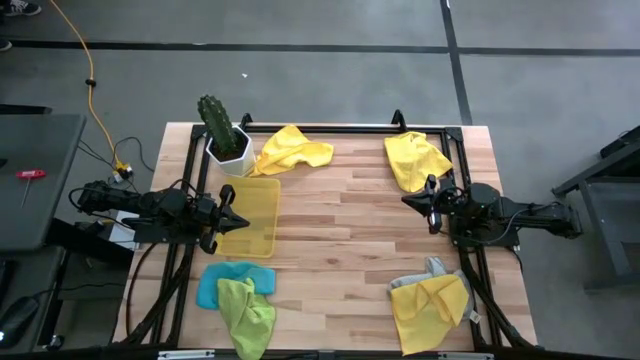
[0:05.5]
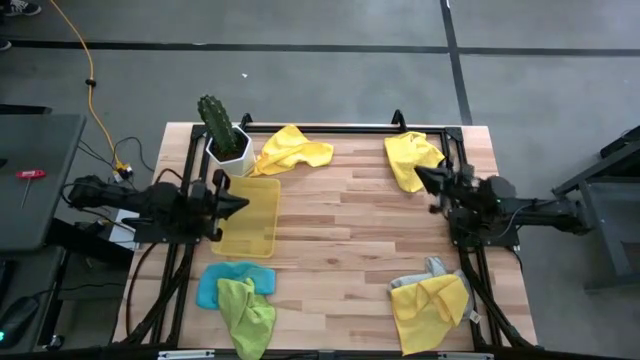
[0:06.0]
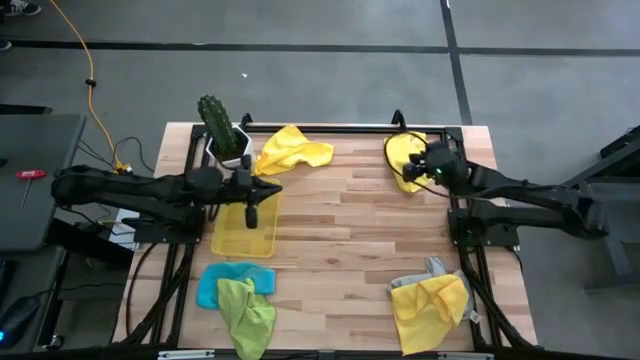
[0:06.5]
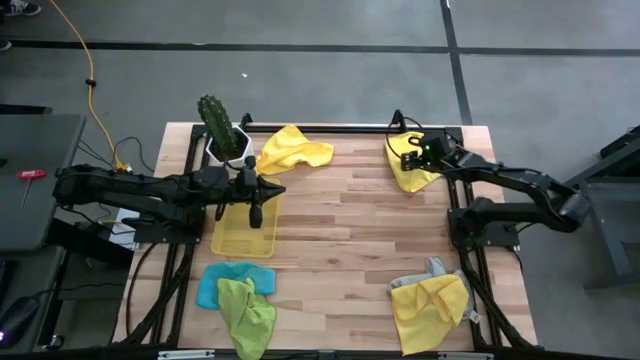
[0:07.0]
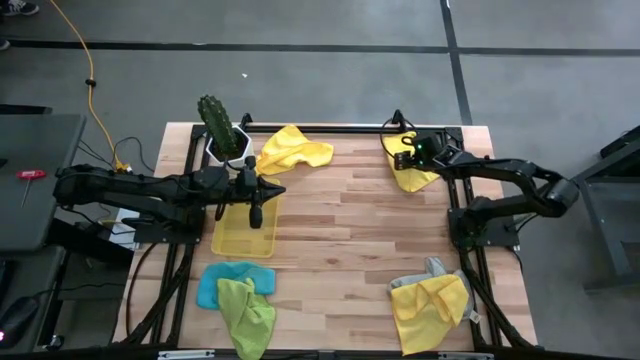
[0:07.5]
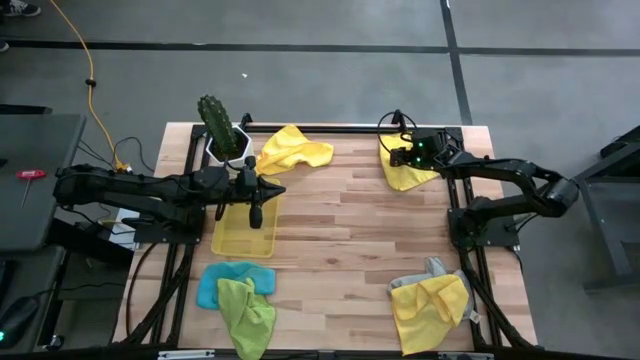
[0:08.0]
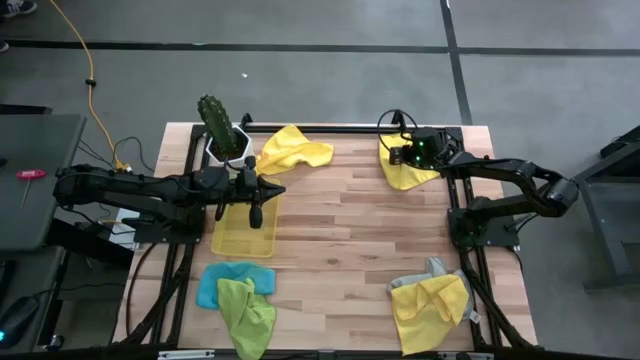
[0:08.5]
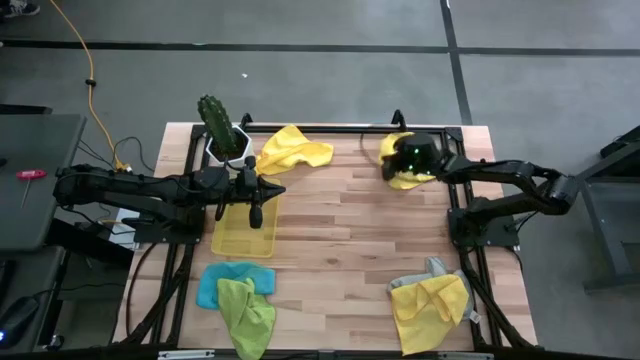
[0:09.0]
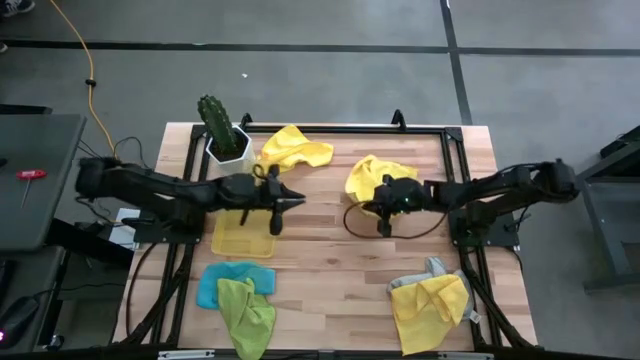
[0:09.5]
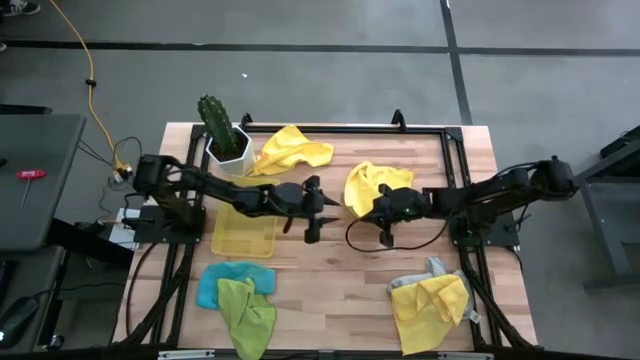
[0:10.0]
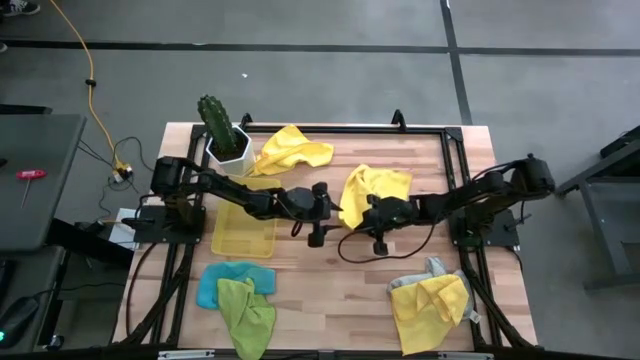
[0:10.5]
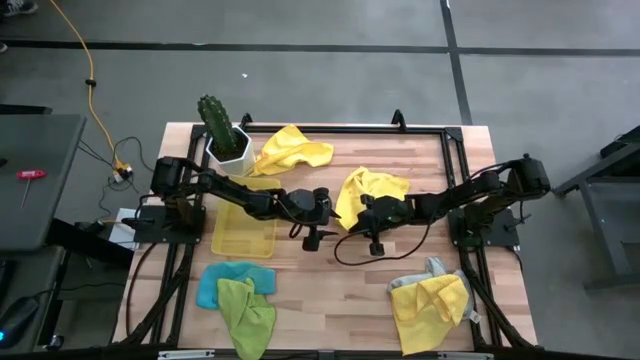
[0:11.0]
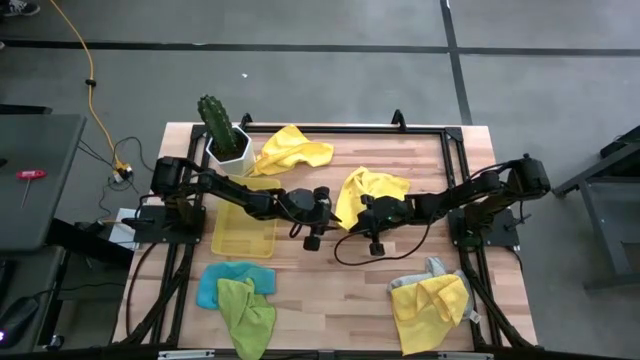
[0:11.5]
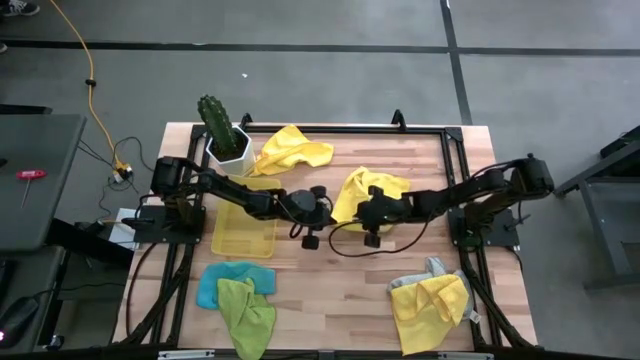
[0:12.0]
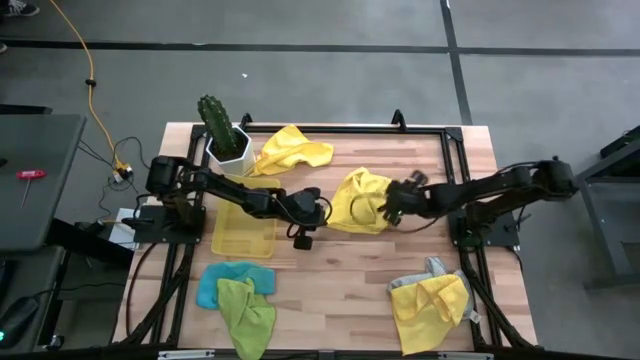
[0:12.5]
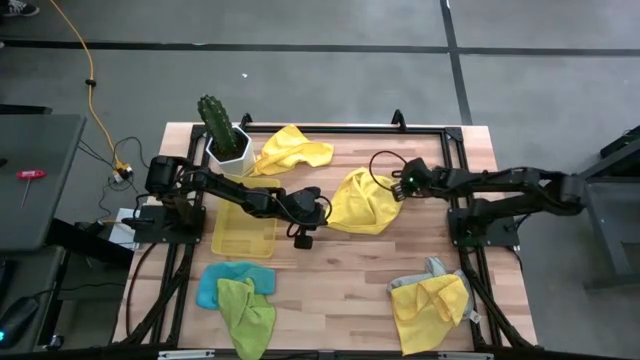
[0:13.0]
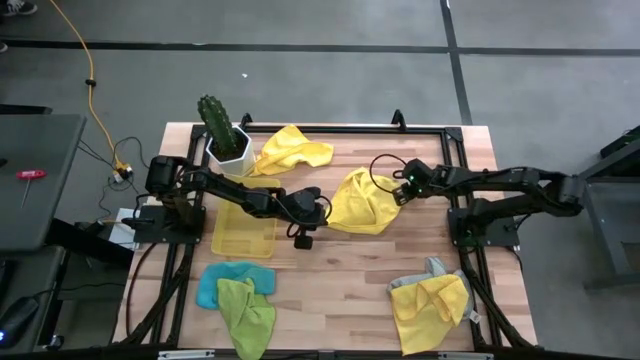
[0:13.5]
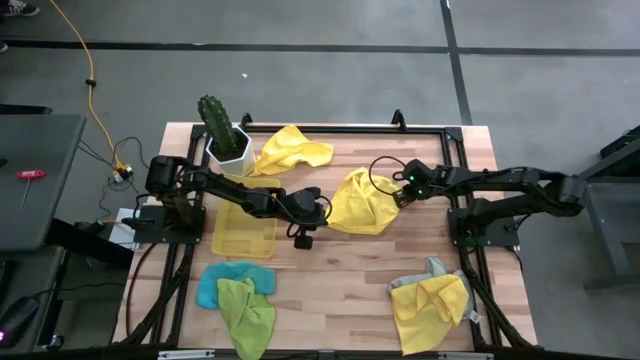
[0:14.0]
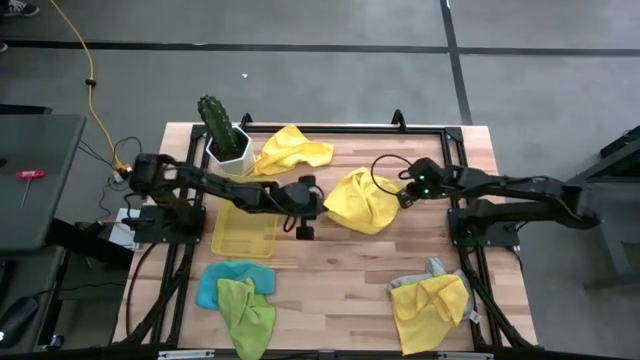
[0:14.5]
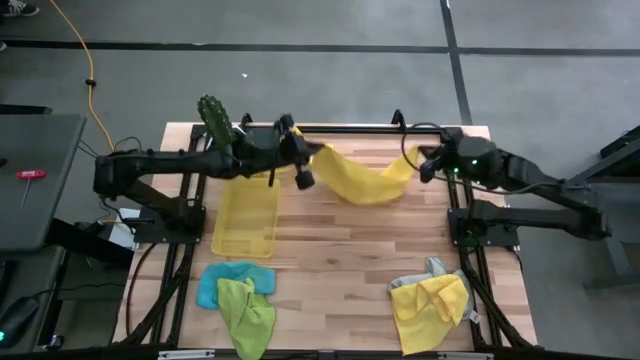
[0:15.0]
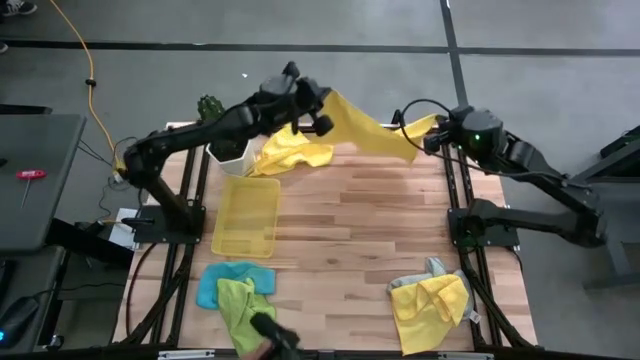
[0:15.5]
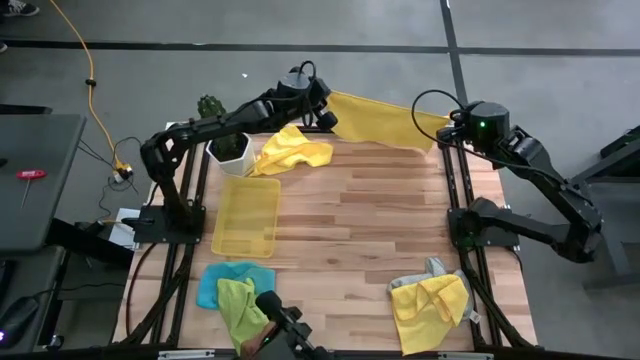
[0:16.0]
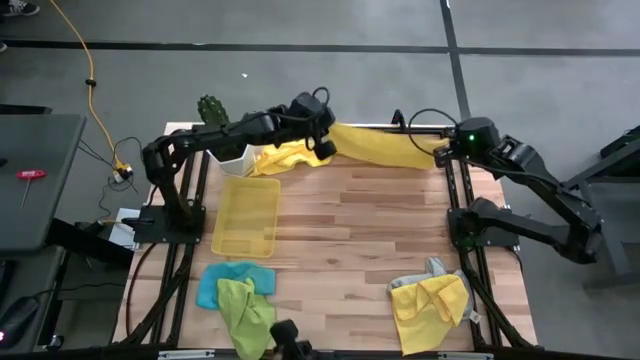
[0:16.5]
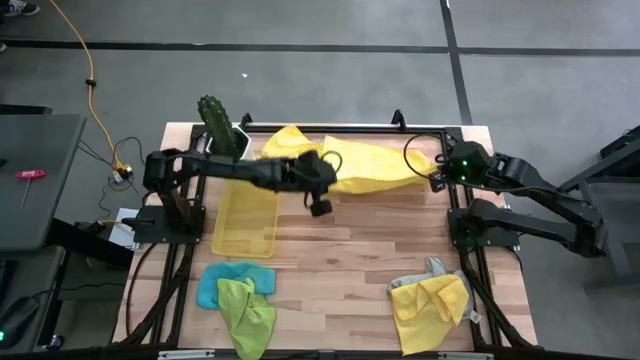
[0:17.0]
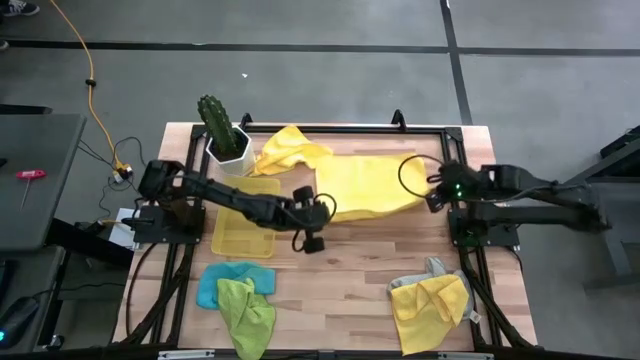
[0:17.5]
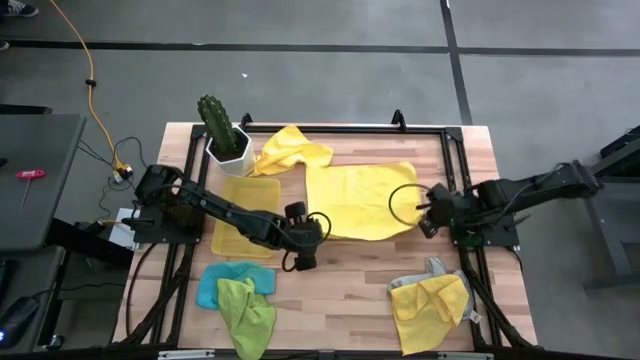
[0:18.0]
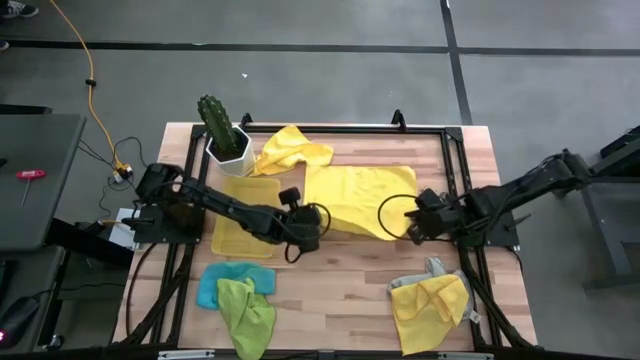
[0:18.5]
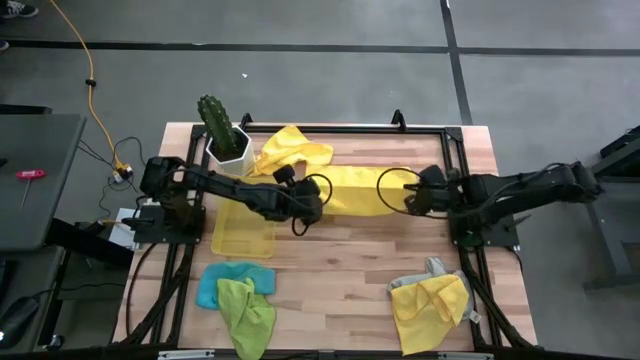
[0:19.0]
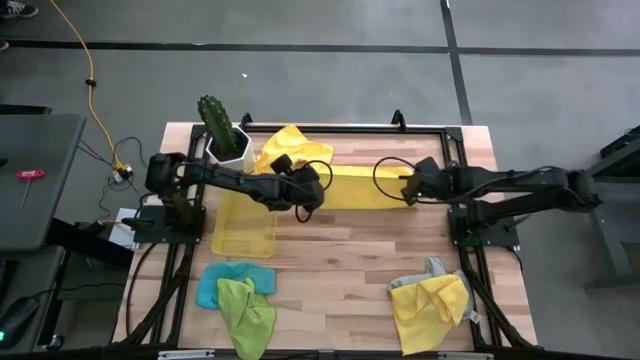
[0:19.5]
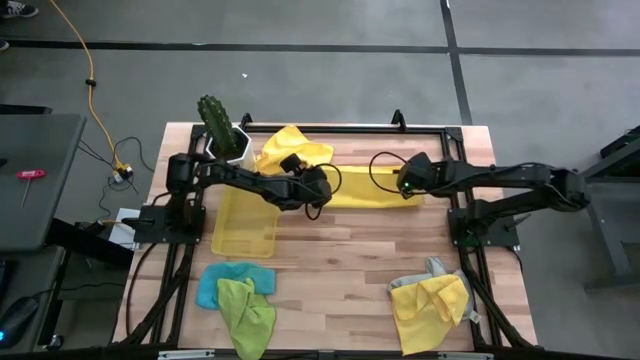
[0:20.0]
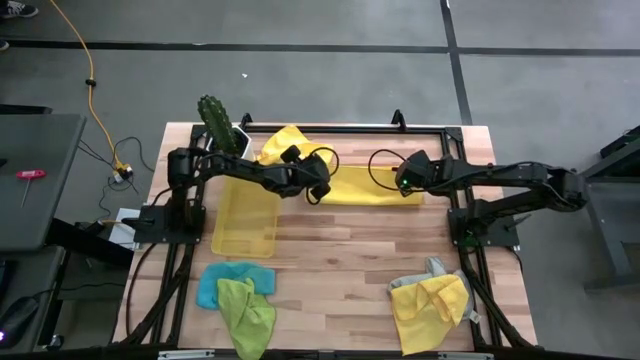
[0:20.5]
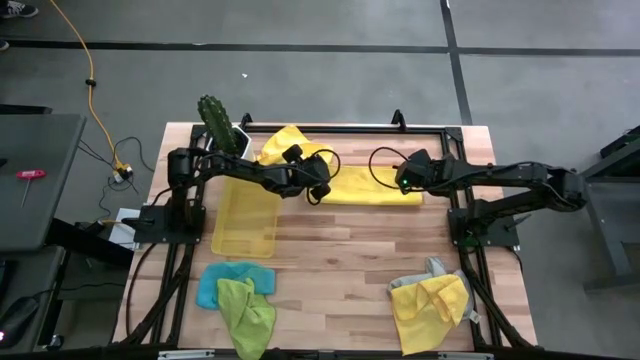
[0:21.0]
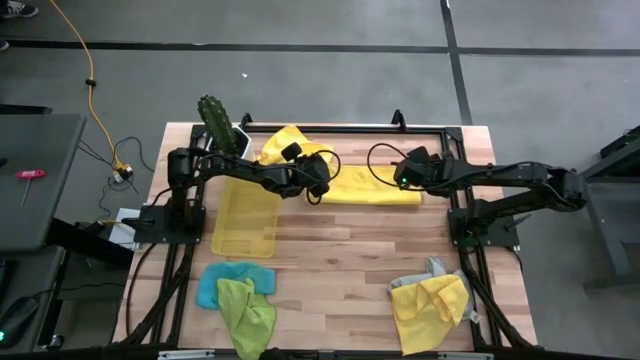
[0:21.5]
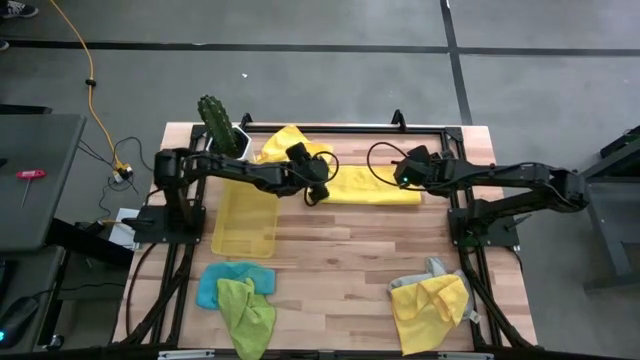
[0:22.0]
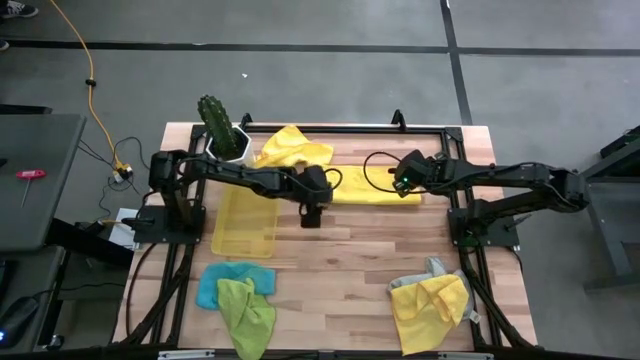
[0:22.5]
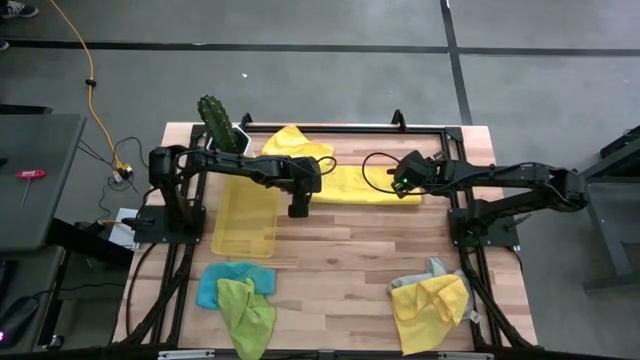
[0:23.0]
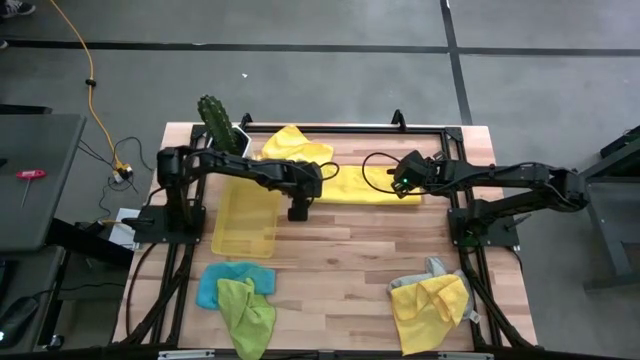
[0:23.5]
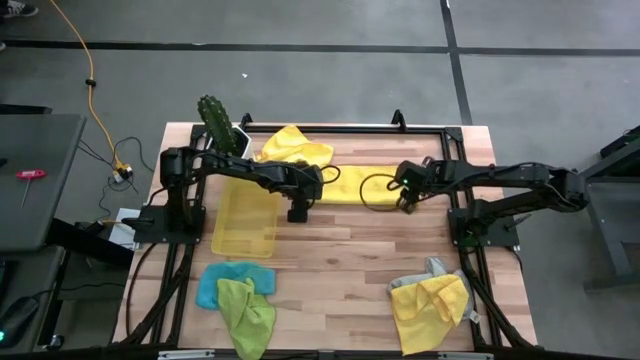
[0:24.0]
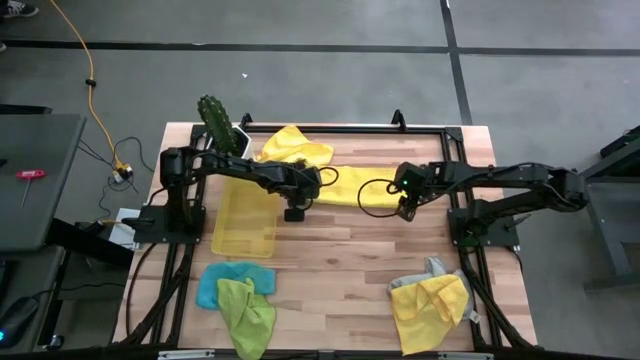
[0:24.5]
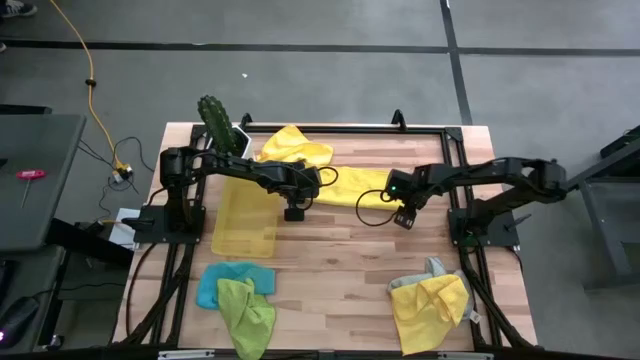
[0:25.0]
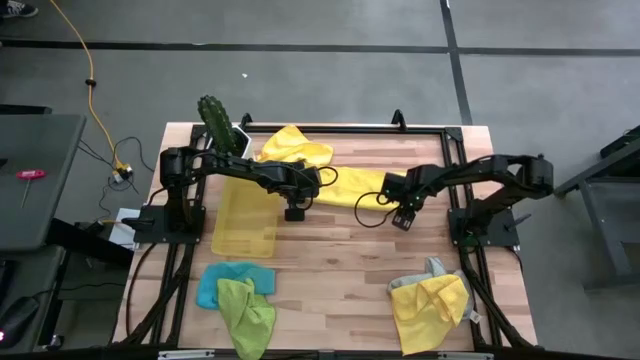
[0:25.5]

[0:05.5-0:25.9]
Task: Fold microfiber towels
Fold the top right yellow microfiber towel
